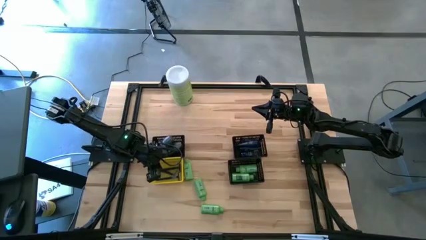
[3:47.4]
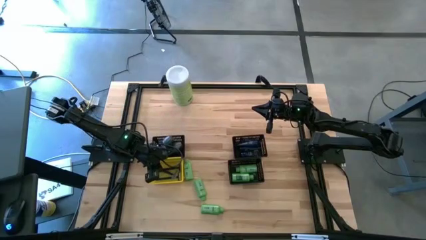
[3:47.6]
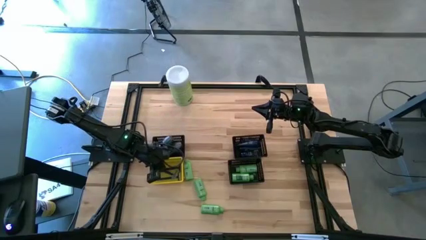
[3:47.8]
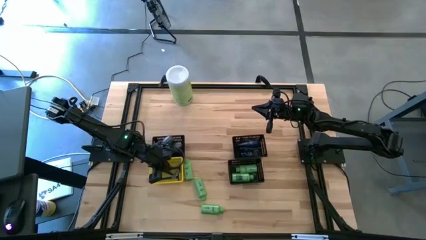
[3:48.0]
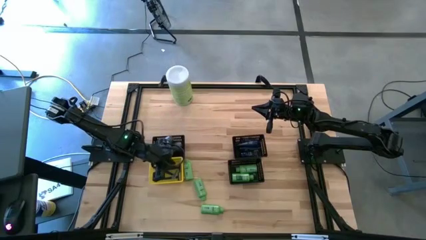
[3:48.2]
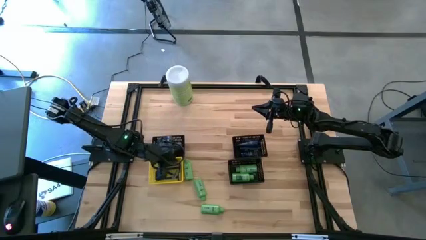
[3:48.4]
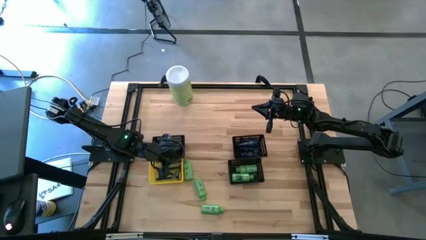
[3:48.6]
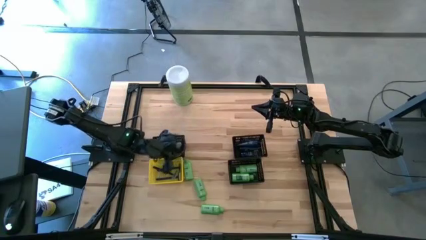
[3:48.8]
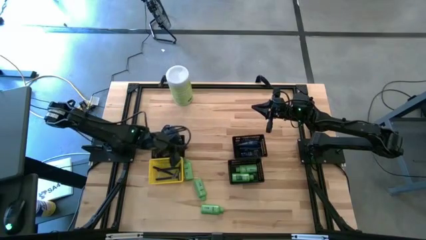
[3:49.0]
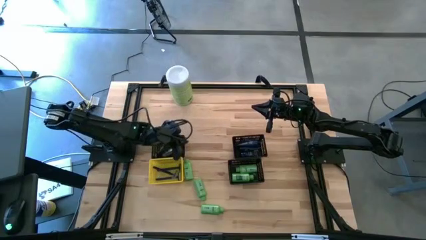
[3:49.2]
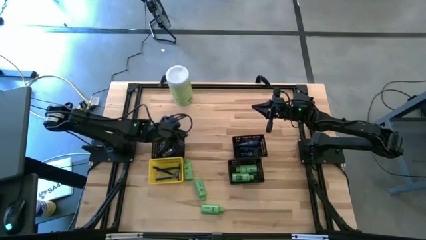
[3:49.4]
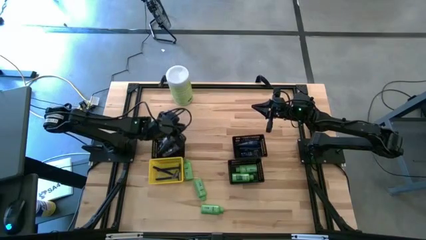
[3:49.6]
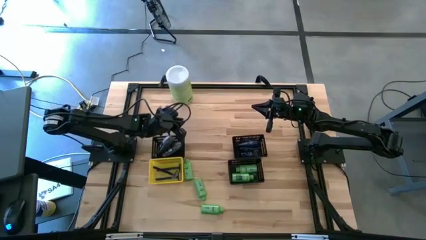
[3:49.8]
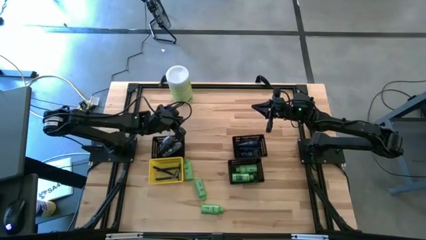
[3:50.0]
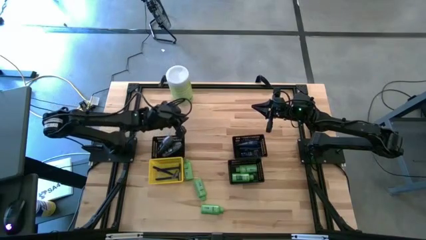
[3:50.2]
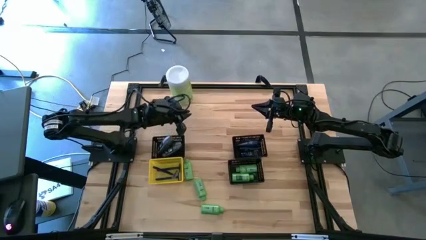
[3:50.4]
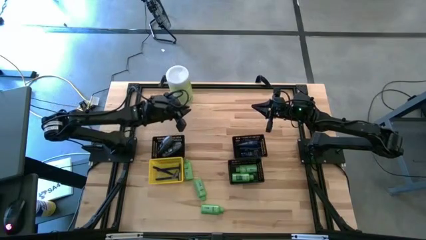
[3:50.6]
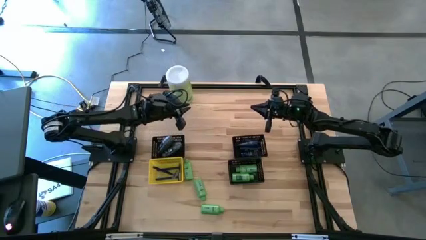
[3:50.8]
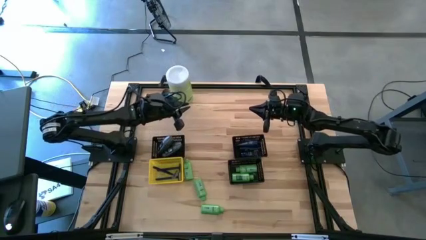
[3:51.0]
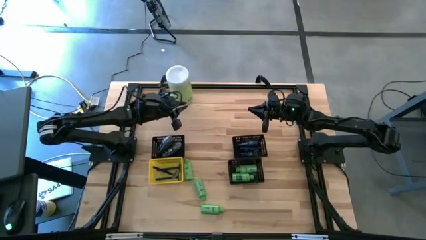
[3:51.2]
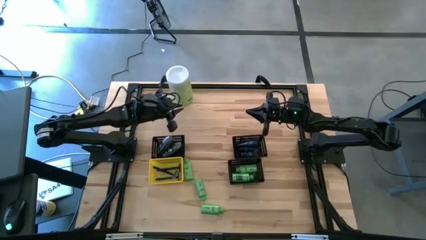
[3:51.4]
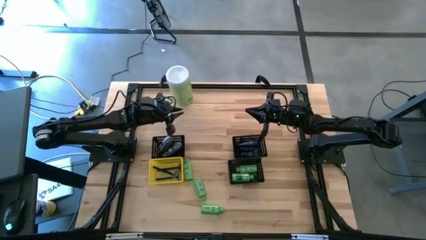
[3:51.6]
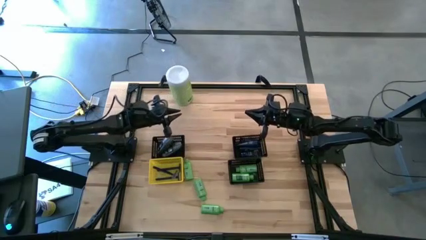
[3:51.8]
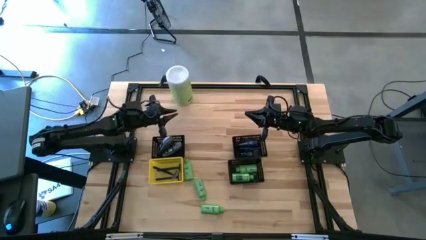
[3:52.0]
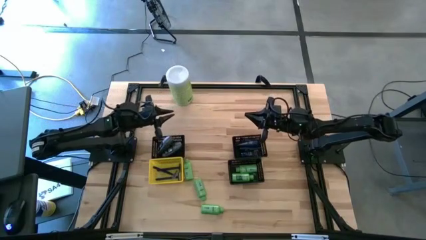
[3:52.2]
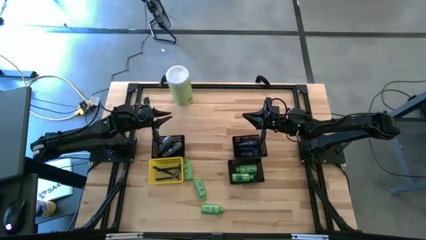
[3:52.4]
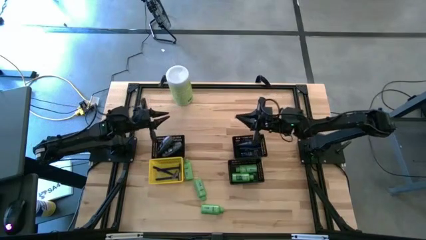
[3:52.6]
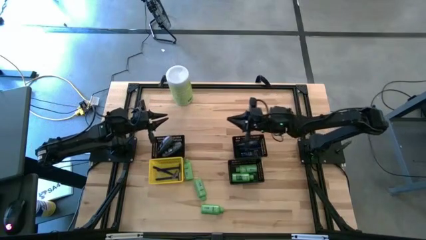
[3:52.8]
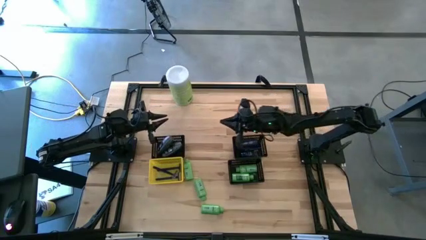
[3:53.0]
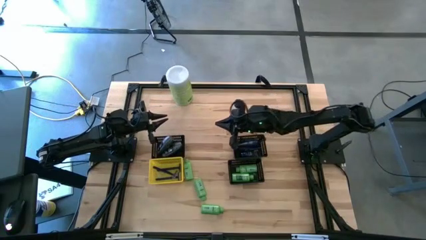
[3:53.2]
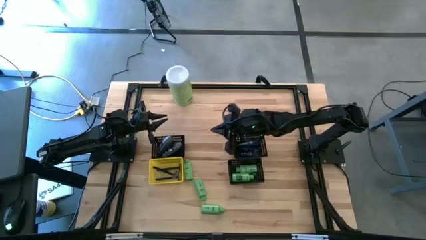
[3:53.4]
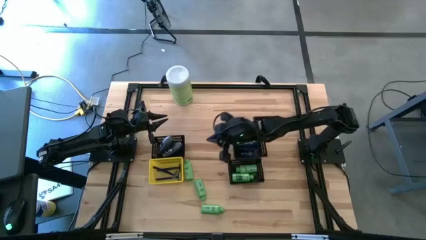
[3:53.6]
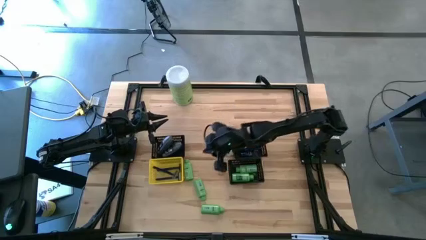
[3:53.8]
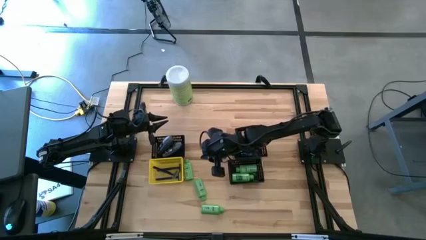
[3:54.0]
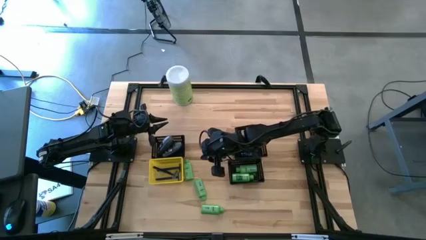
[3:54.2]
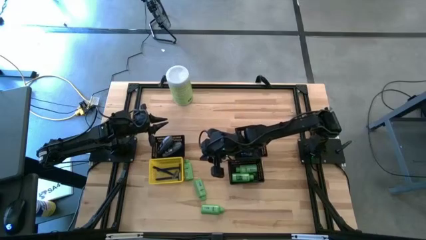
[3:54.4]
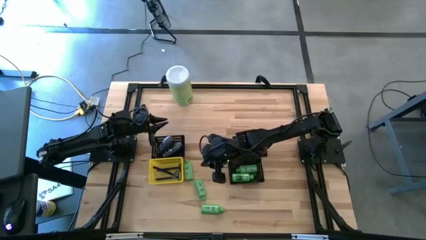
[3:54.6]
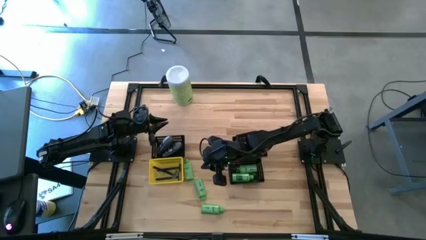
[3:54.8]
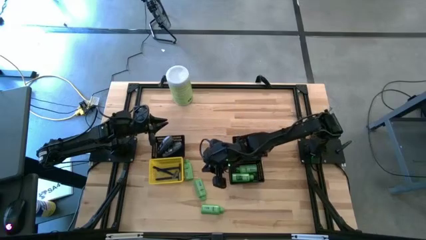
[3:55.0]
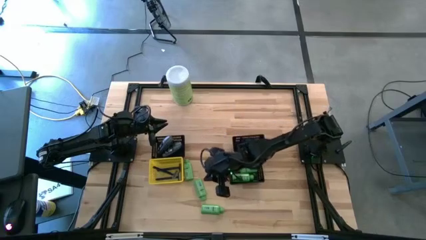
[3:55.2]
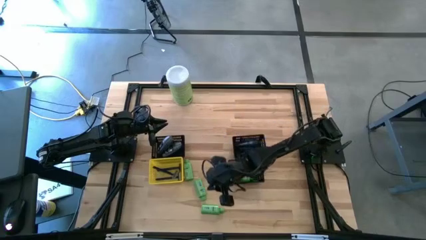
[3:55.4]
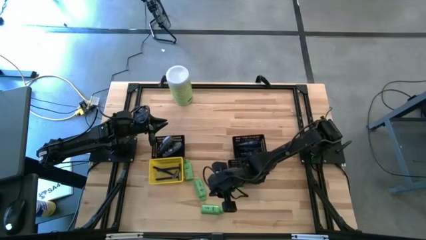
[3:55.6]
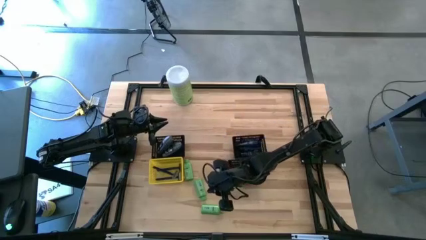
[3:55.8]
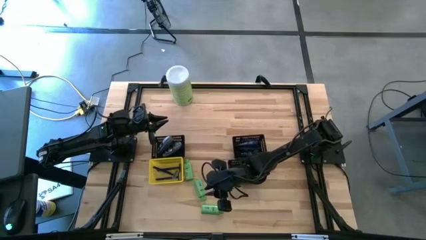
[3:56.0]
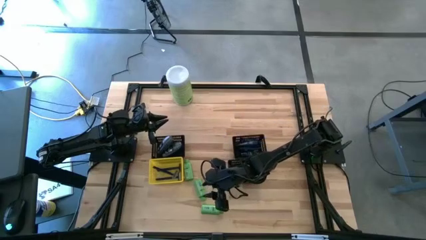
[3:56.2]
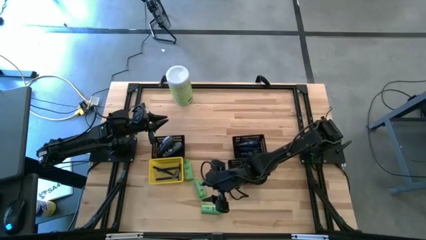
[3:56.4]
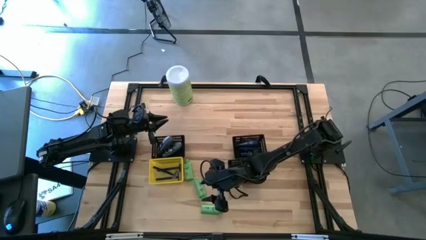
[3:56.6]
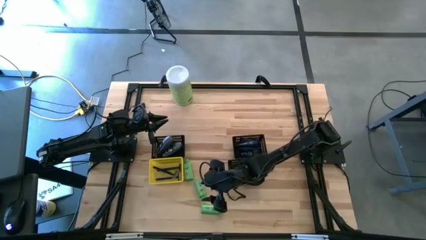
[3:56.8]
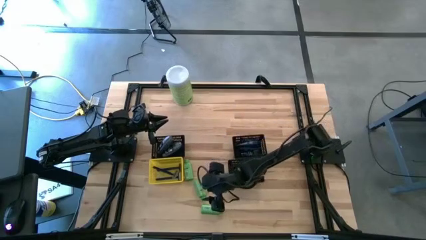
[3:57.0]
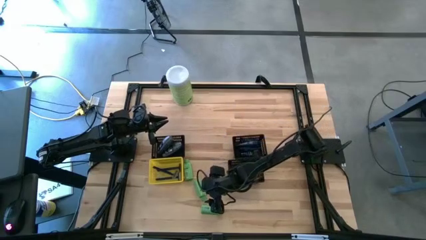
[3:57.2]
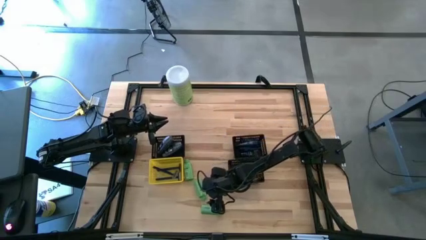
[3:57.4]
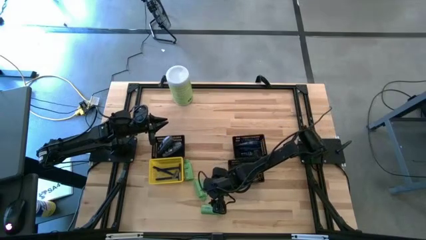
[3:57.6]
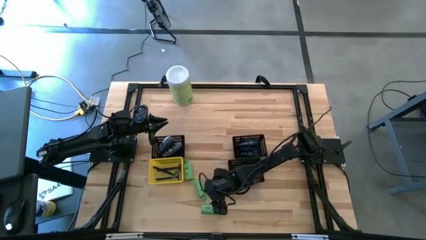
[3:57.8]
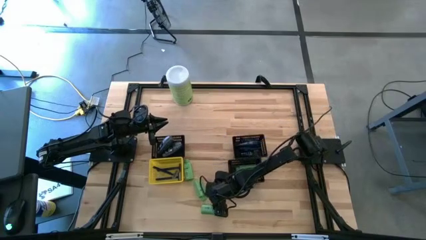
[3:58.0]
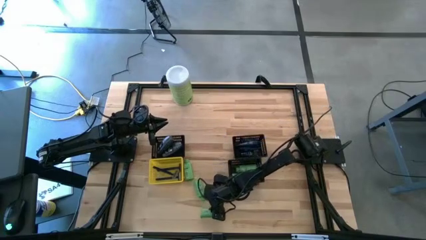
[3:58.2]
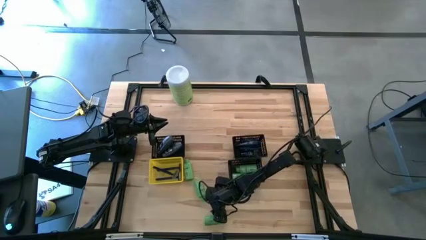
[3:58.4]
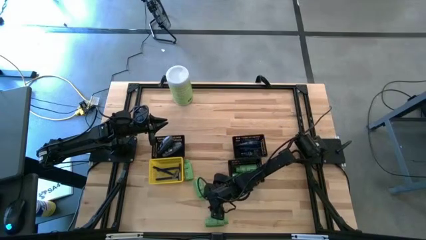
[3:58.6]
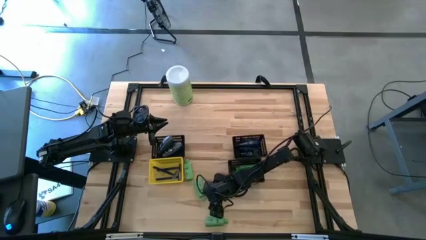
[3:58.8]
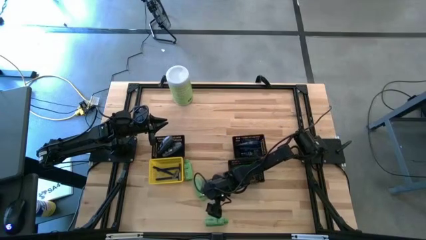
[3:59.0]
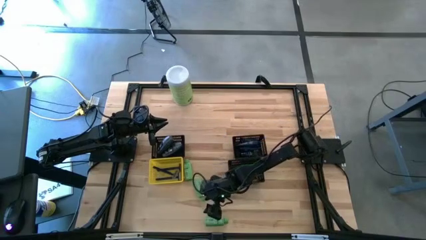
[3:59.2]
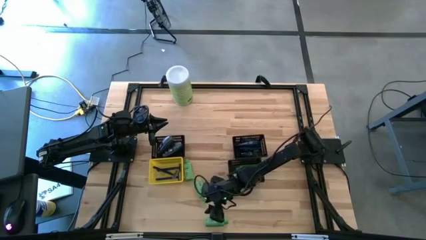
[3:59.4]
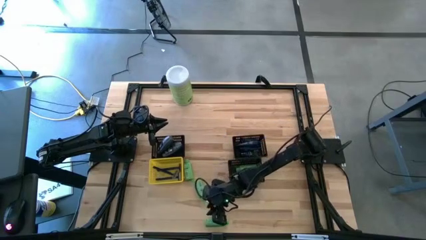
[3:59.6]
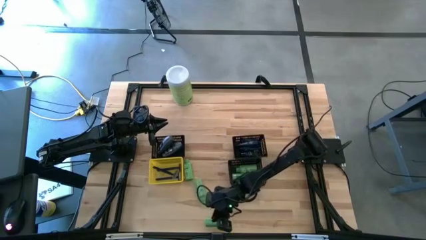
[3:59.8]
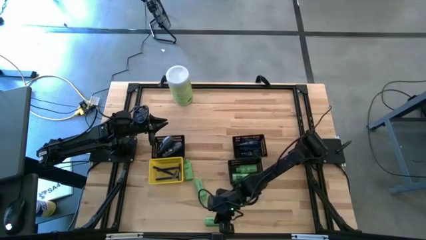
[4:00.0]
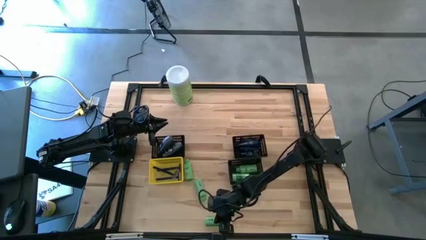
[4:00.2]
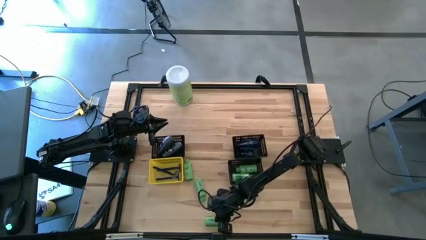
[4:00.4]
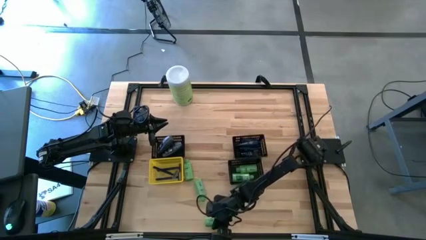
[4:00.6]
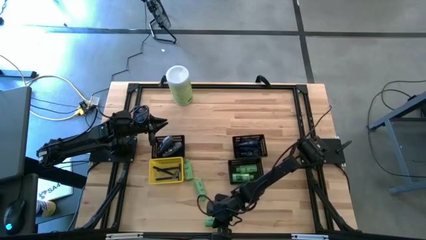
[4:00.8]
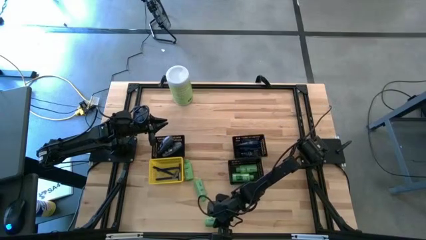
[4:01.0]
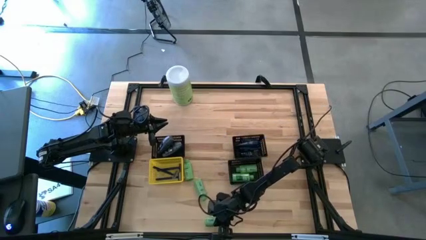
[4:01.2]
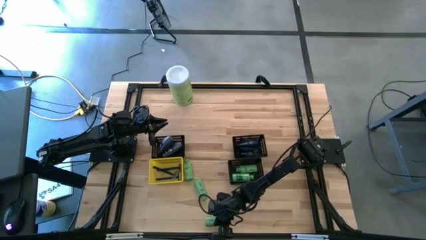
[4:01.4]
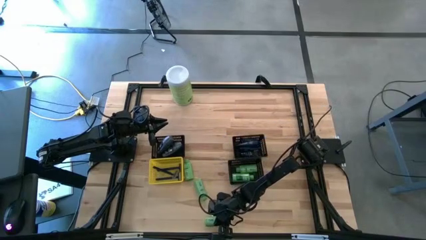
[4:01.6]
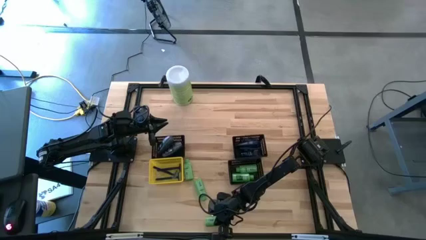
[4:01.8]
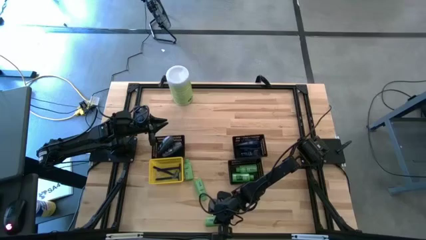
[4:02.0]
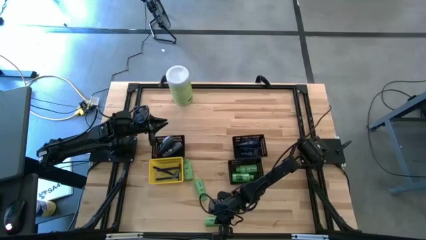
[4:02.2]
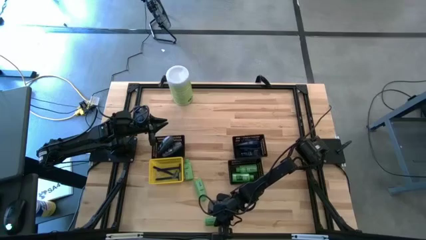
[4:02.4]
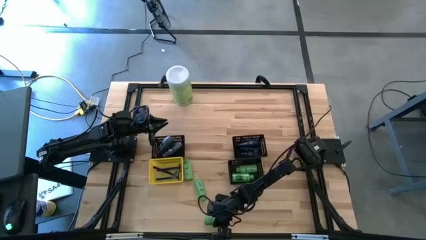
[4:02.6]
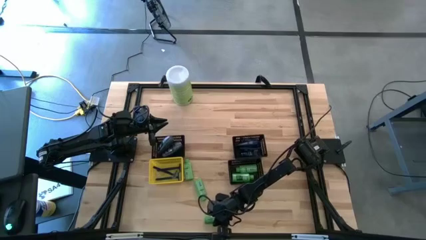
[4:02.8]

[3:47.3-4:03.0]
Task: Pick & Place Travel size toiletries
Put the green shampoo into the bottom right black bin
